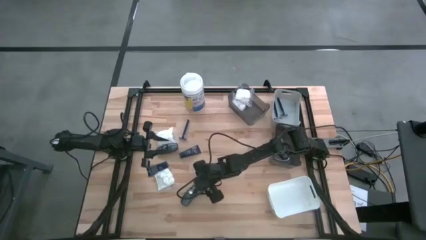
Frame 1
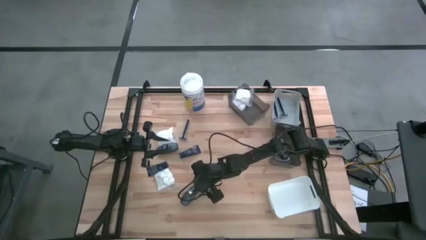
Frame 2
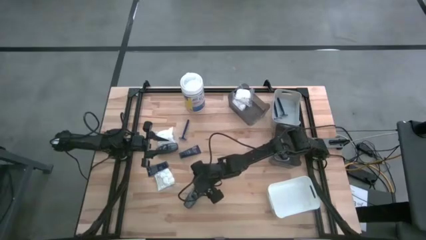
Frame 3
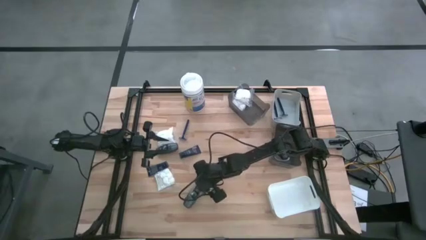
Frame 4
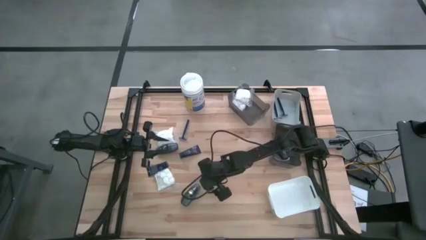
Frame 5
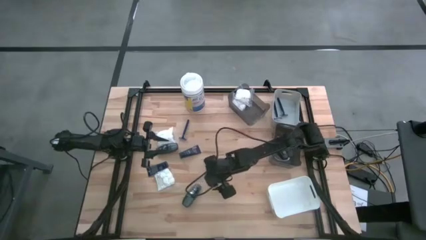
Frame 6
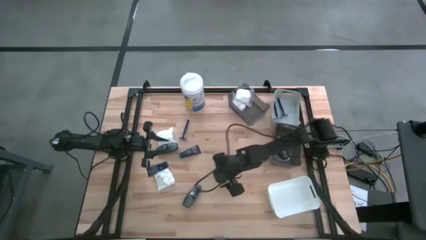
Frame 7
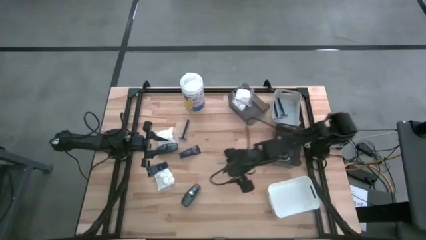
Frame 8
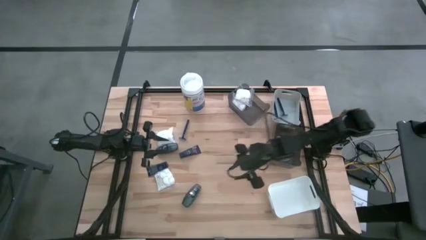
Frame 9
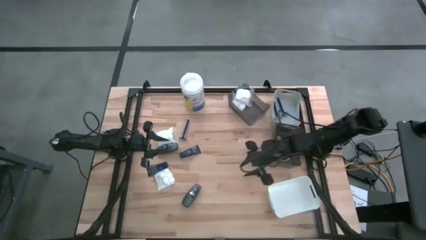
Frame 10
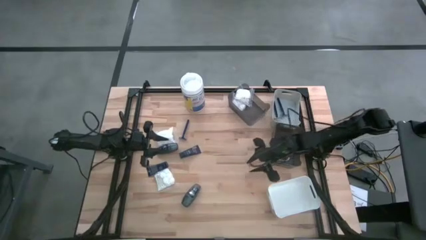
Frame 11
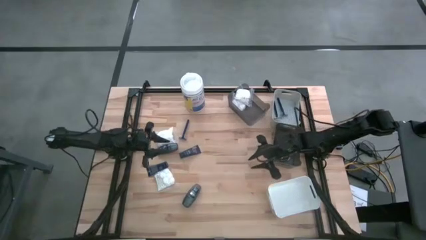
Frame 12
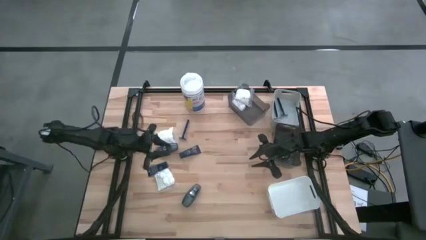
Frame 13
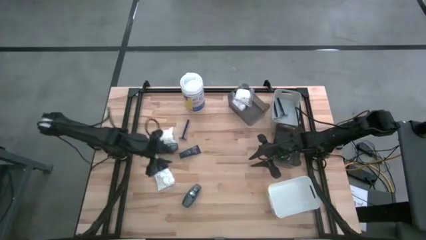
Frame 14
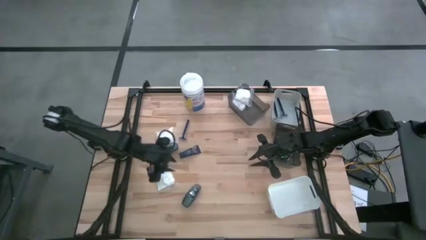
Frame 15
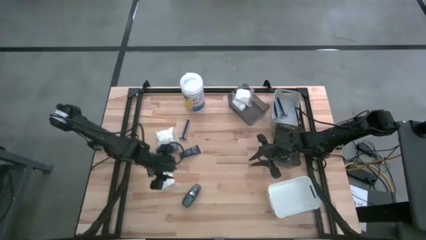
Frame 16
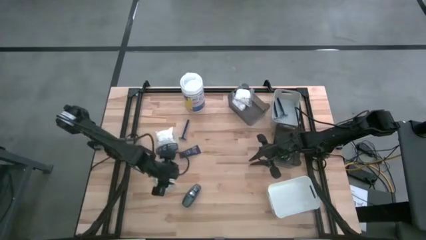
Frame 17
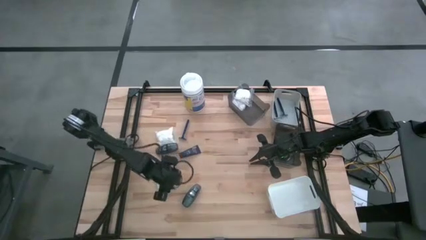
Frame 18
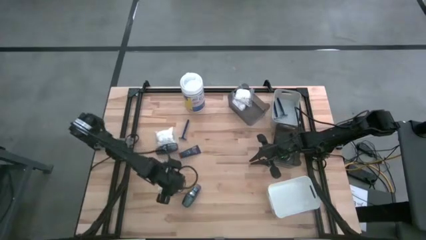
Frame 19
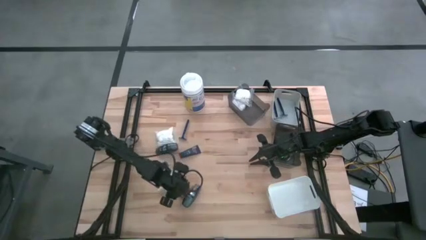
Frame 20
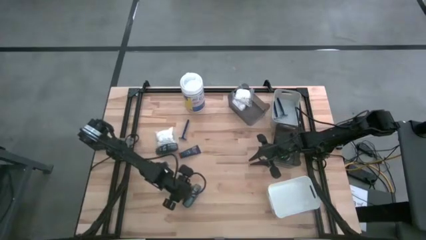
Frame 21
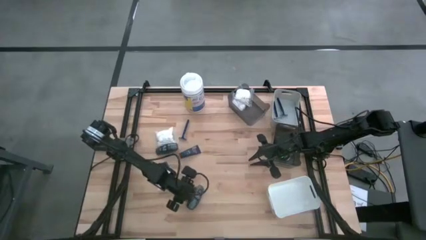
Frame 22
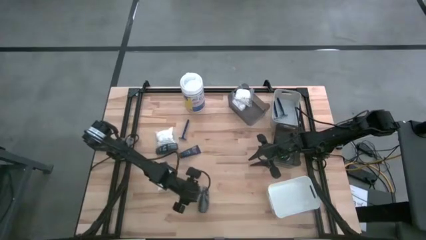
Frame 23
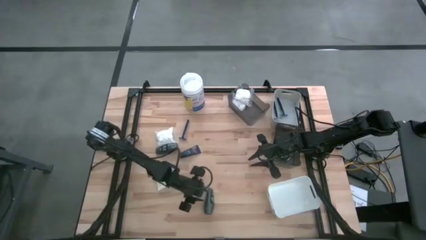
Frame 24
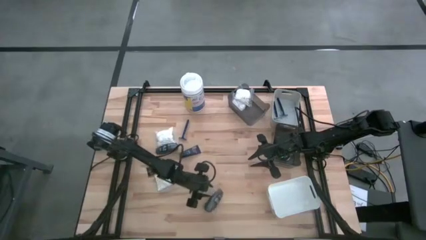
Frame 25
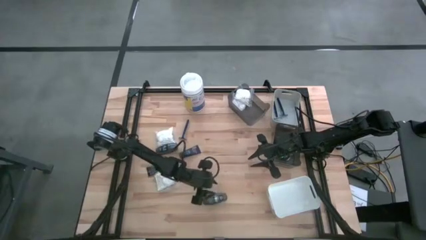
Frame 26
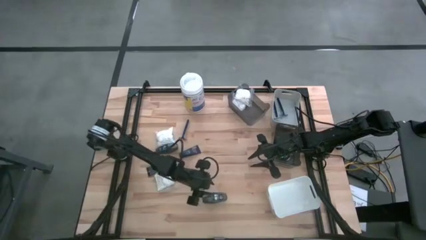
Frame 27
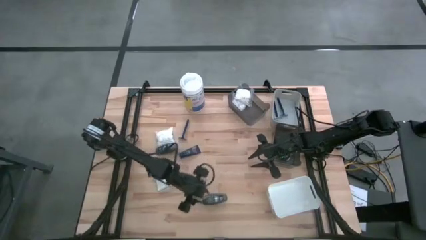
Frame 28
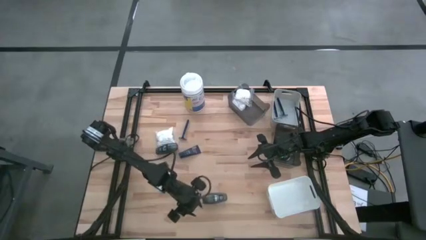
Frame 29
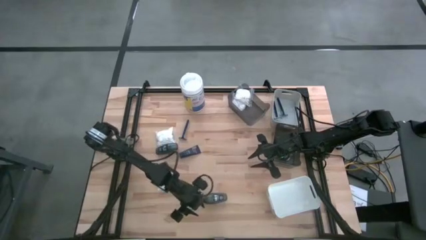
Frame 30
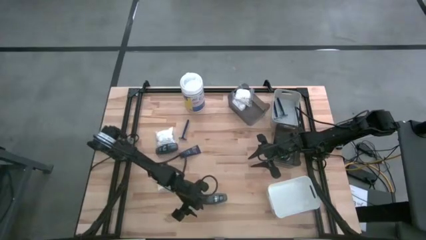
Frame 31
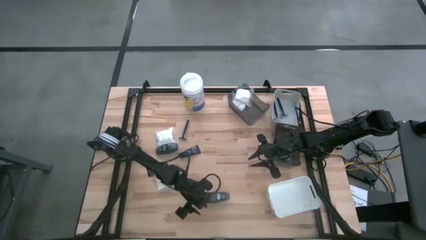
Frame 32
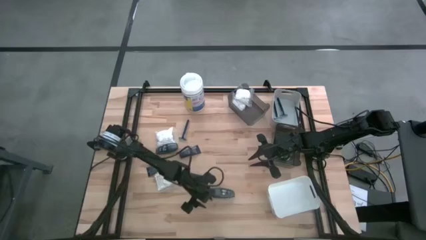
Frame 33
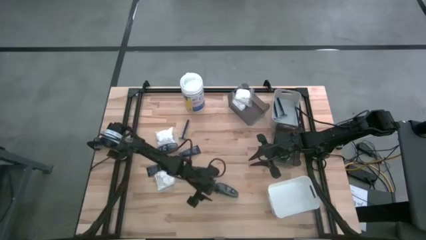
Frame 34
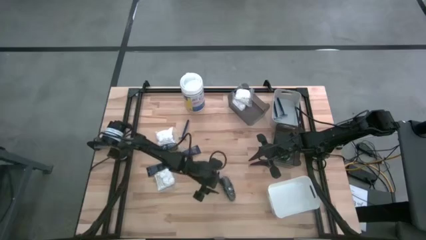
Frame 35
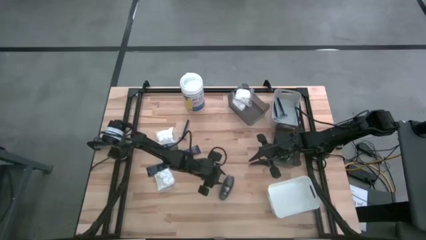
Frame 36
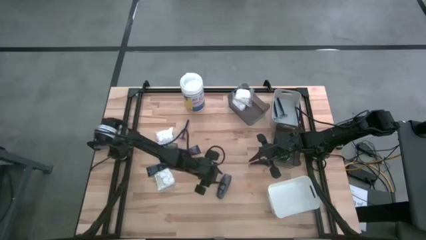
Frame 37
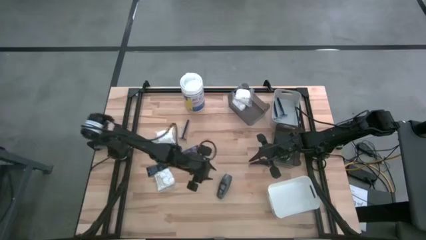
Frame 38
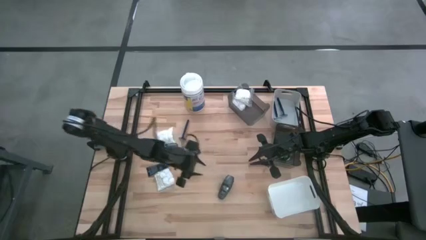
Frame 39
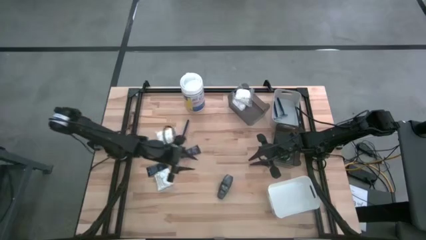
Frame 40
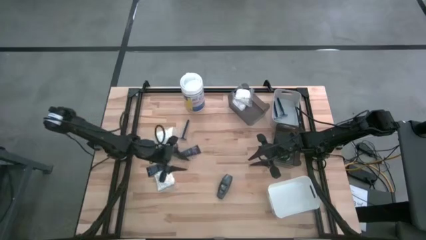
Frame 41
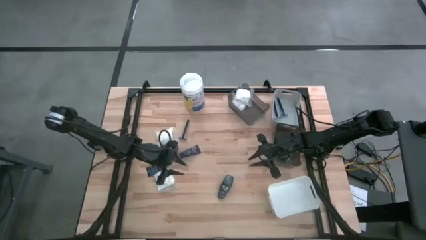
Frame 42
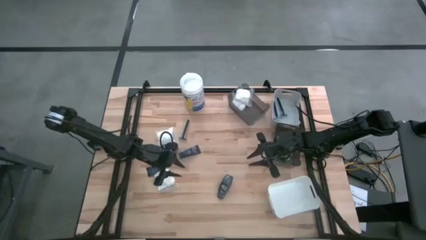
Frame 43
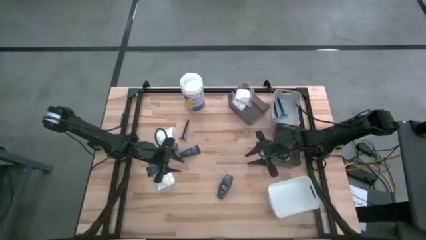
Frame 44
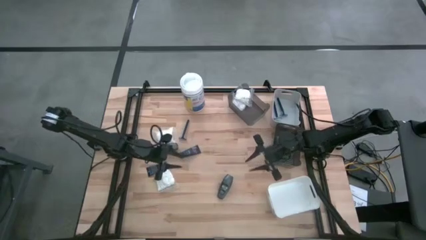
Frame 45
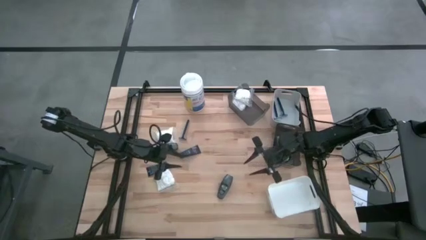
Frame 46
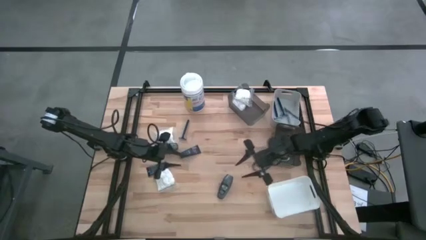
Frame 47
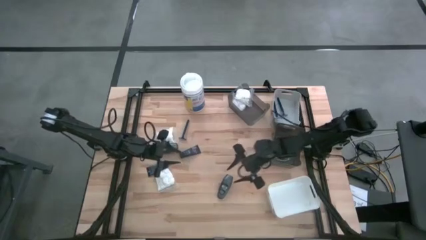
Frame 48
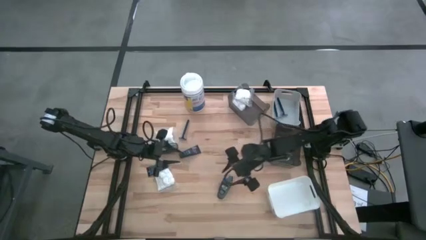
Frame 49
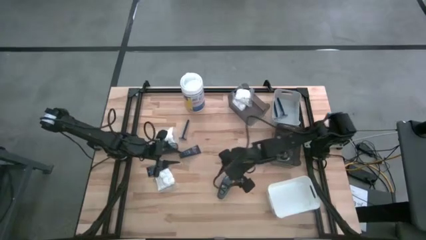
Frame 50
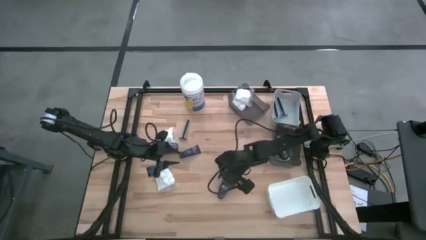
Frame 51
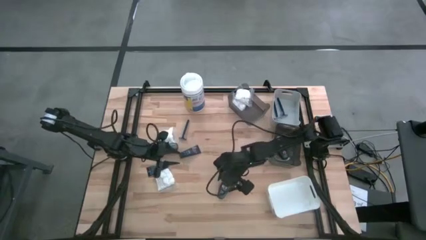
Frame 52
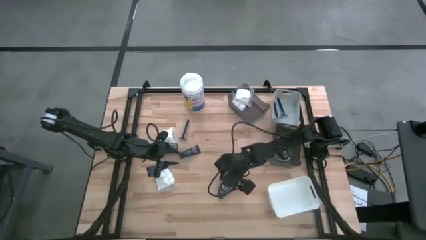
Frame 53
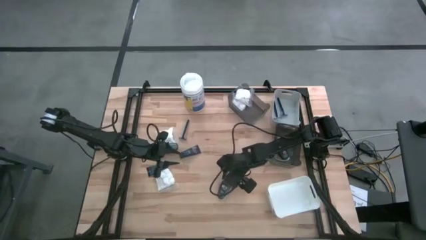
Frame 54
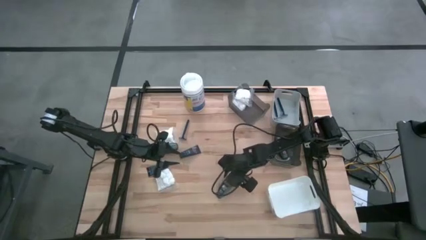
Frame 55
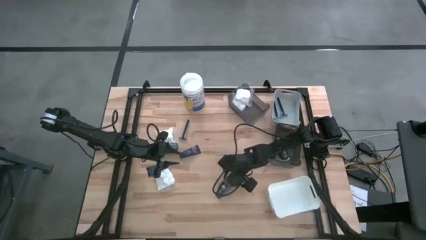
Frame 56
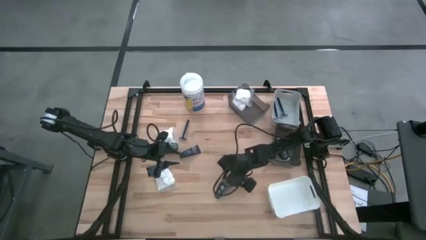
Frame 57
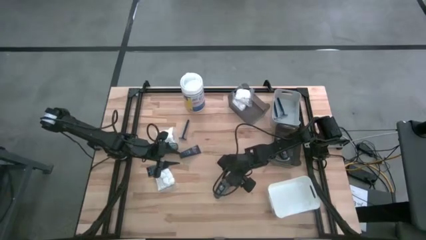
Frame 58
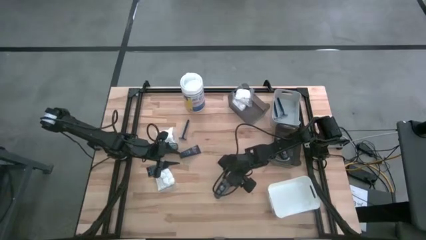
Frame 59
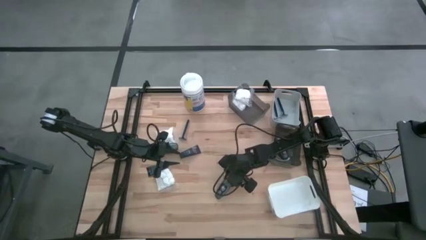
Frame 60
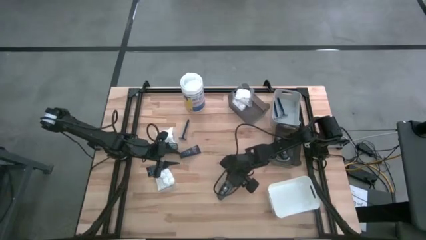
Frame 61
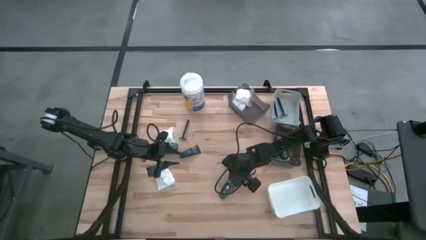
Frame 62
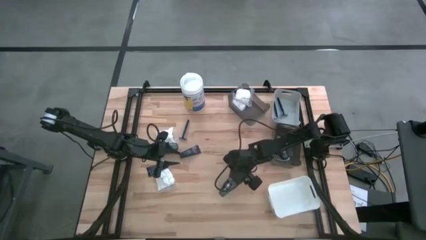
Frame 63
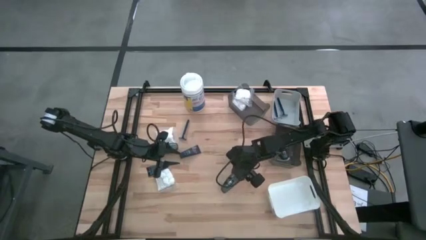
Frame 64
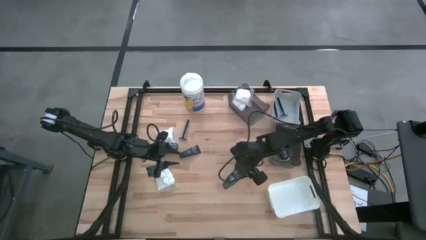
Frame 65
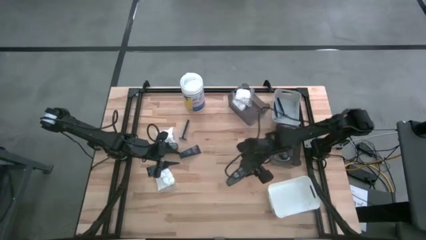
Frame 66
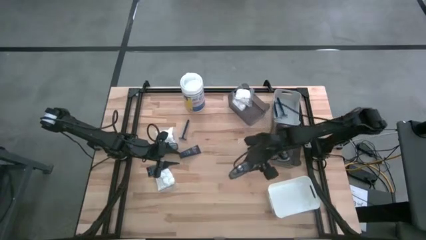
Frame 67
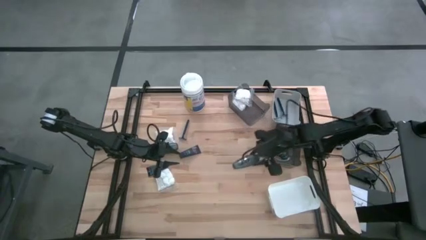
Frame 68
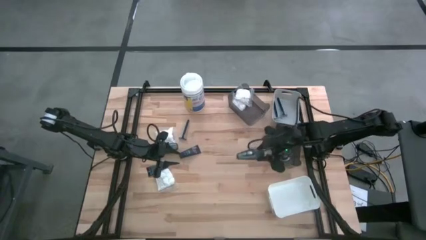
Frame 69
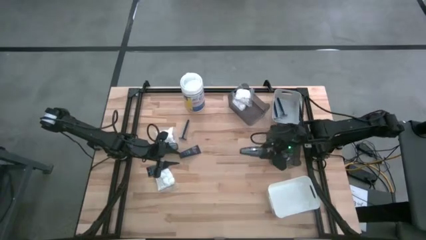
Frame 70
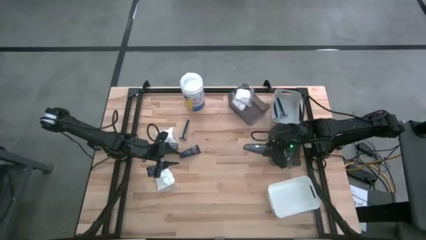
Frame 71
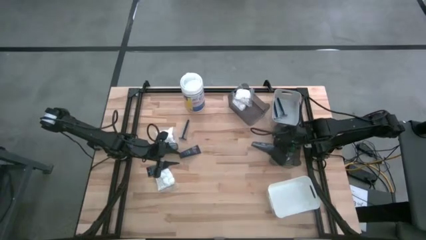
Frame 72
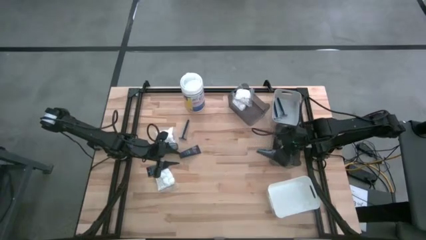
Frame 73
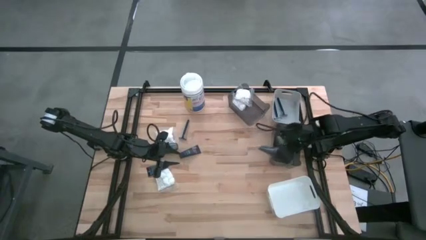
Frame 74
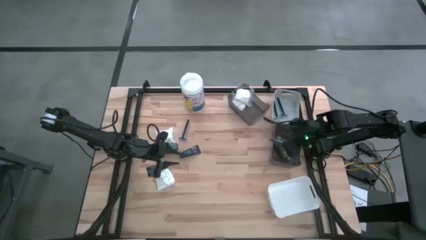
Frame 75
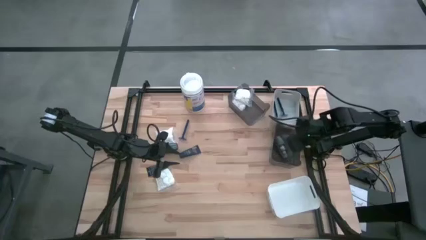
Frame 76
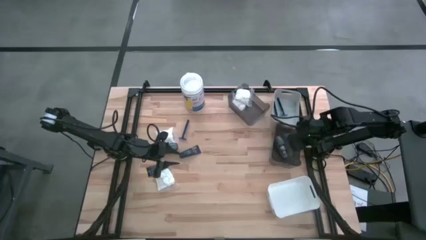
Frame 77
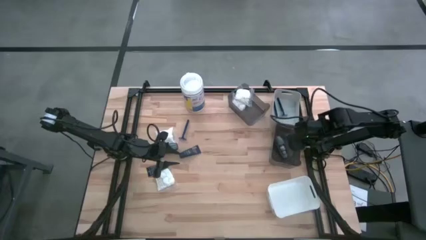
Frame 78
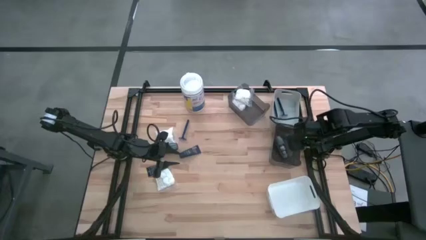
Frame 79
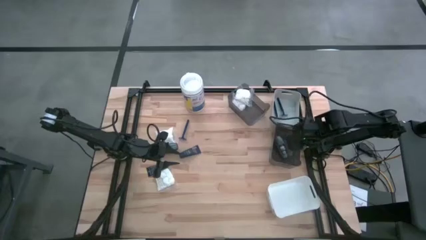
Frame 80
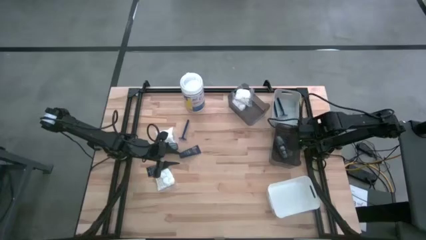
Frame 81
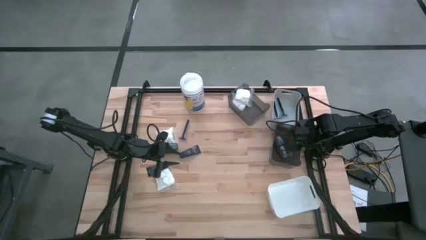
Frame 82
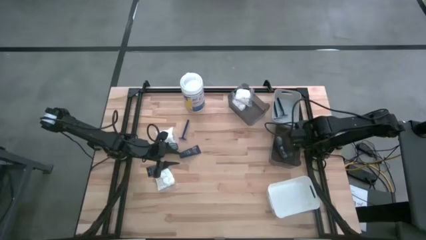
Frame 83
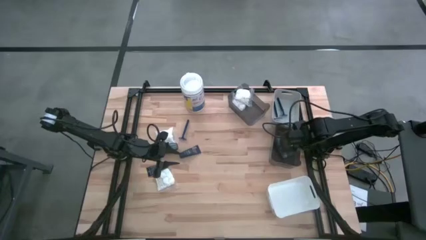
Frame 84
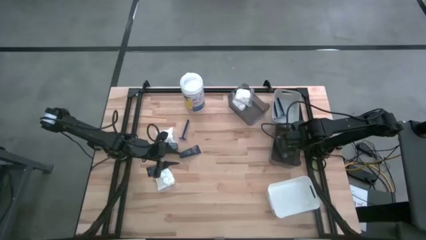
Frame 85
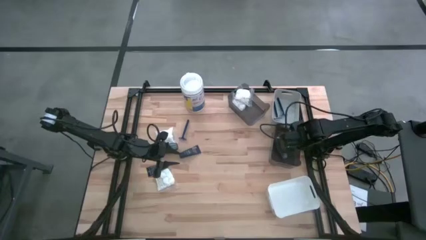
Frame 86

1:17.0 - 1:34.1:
Task: Pick & Place Travel size toiletries
Put the bottom gray deodorant into the bottom black bin
